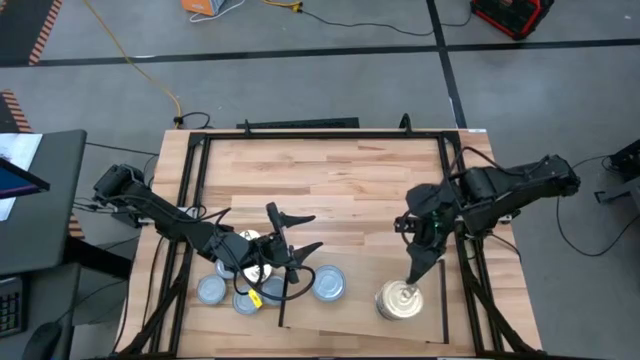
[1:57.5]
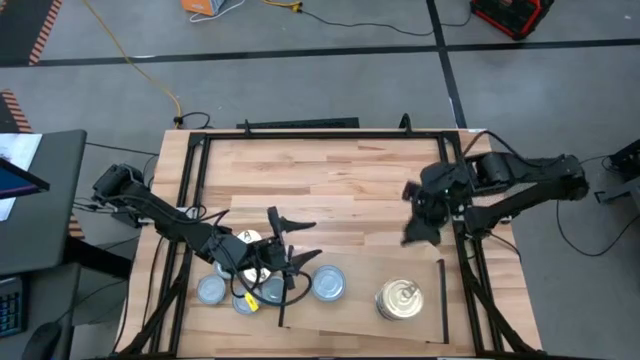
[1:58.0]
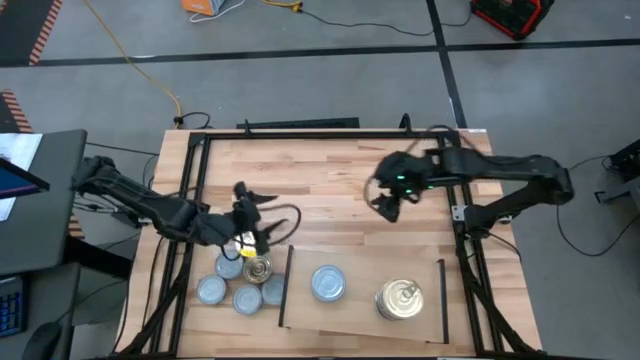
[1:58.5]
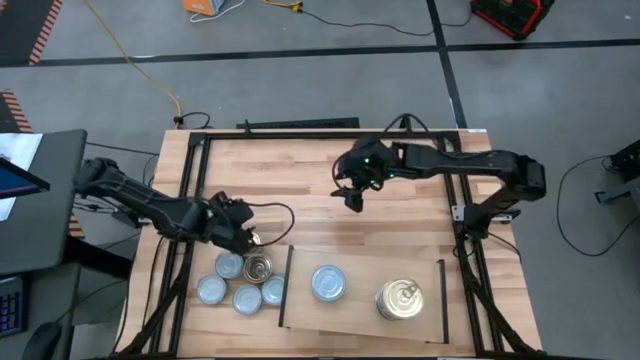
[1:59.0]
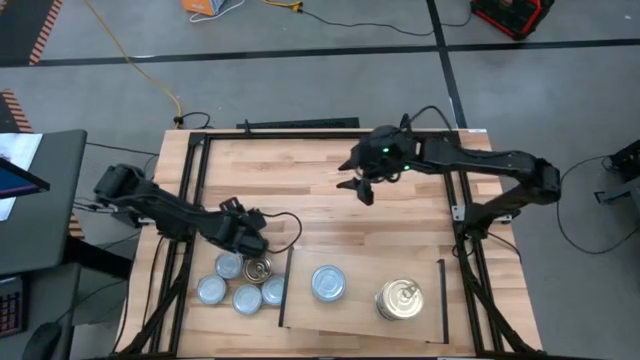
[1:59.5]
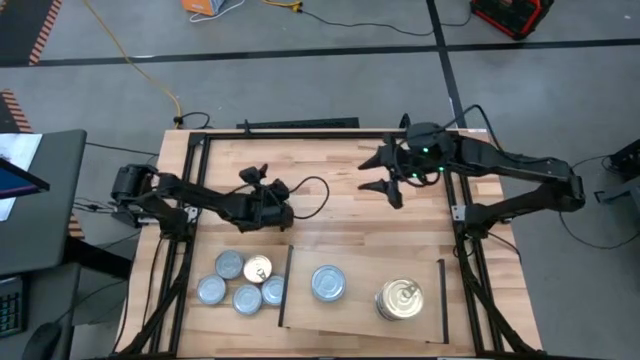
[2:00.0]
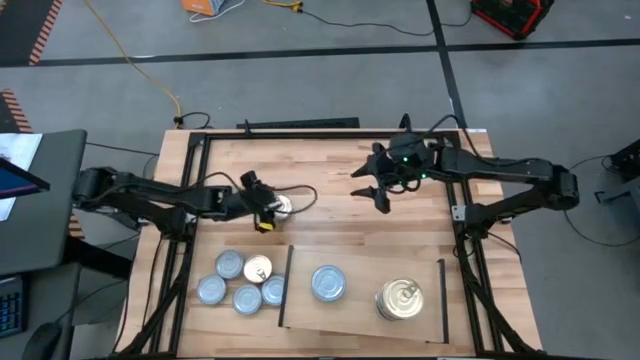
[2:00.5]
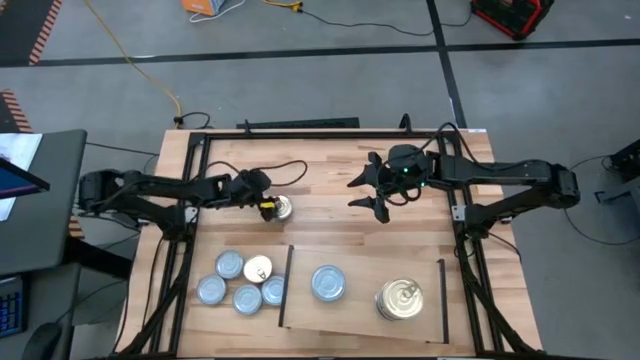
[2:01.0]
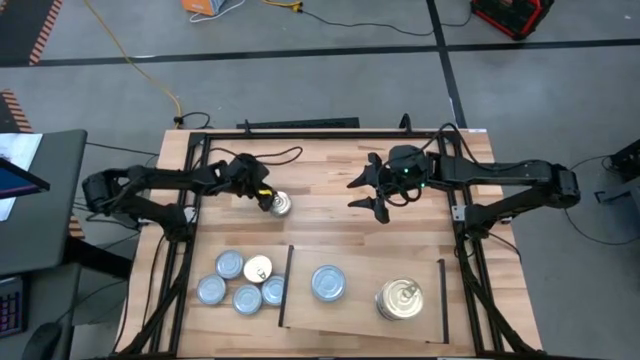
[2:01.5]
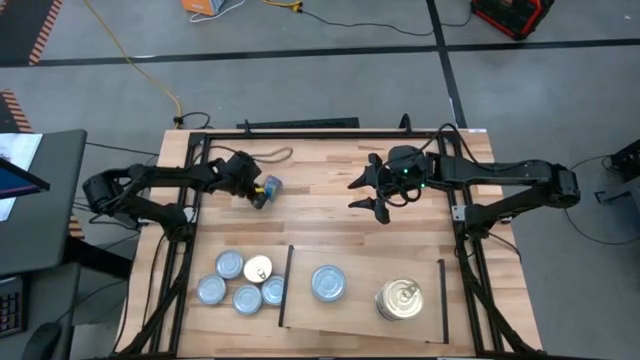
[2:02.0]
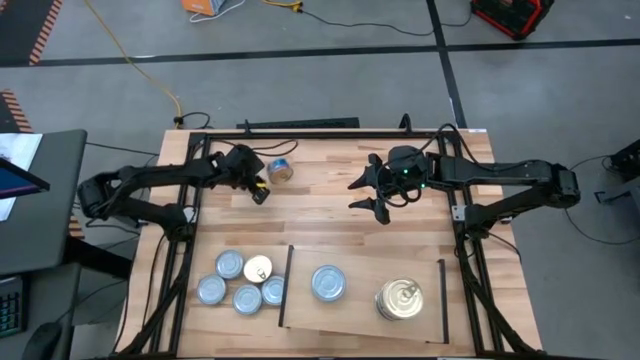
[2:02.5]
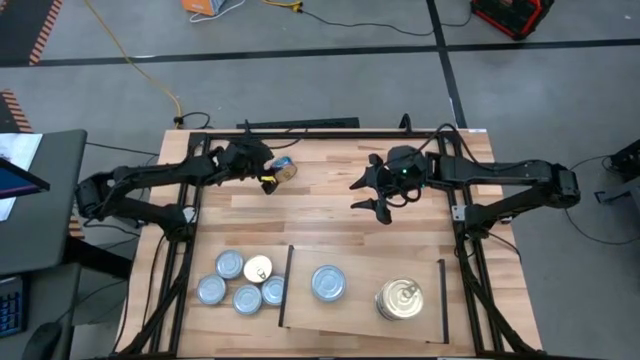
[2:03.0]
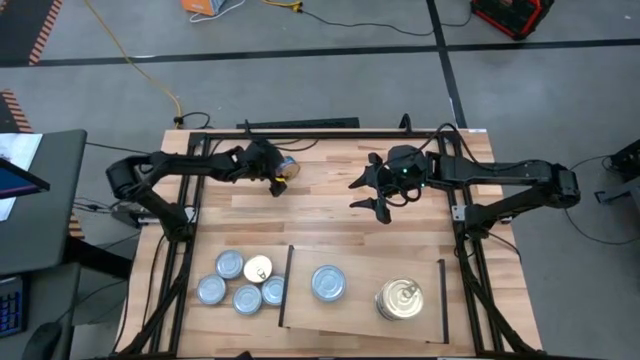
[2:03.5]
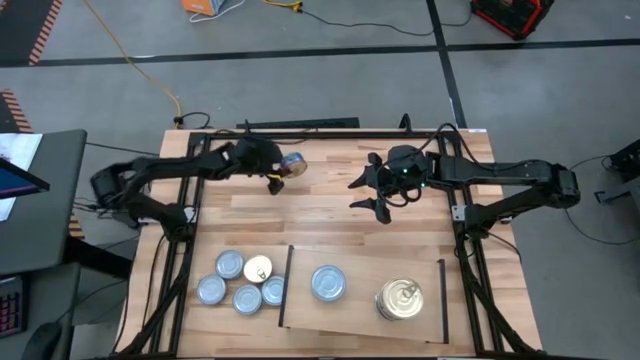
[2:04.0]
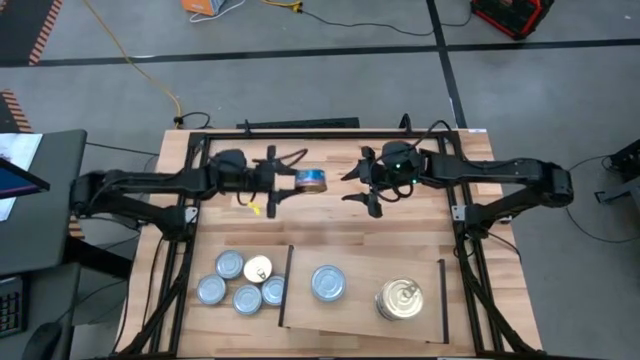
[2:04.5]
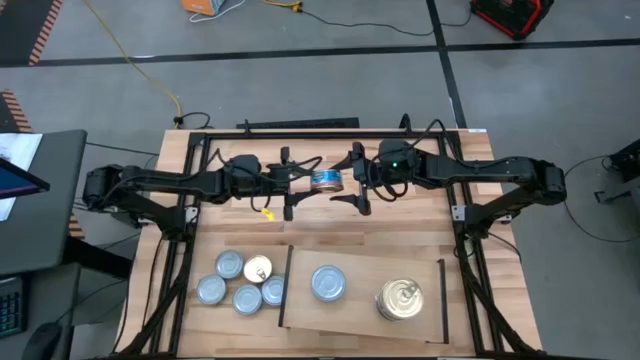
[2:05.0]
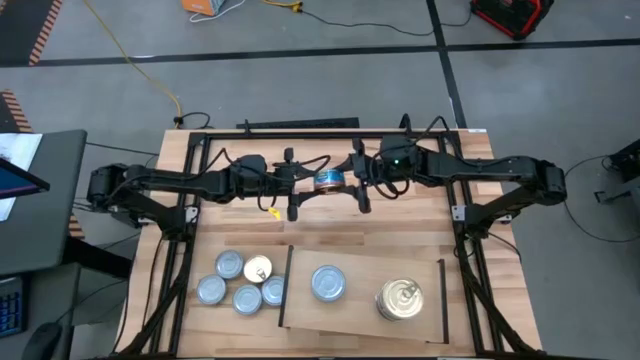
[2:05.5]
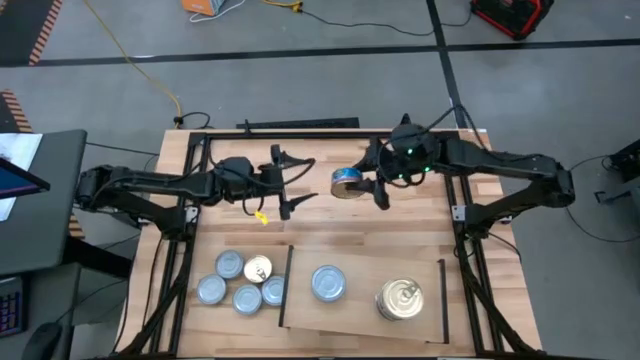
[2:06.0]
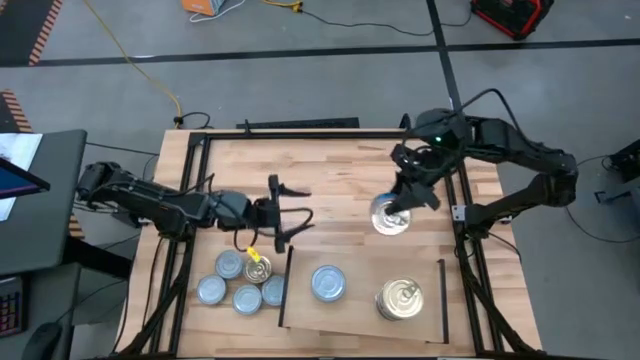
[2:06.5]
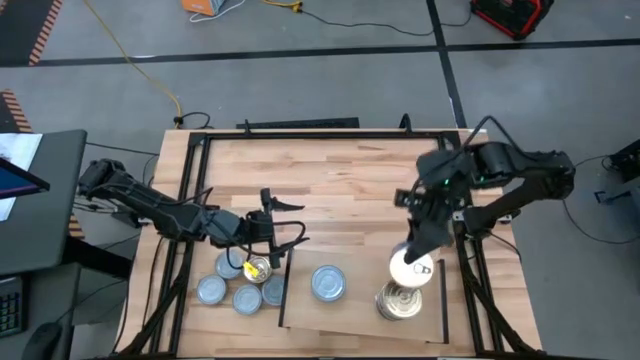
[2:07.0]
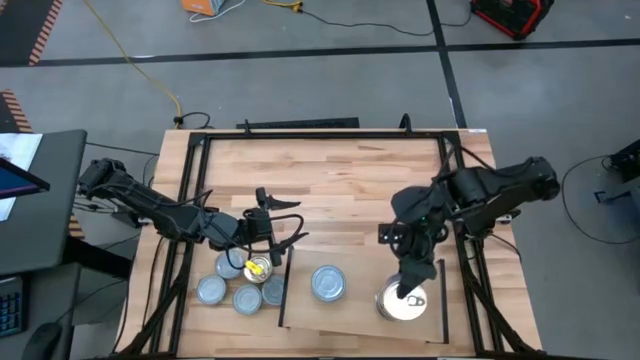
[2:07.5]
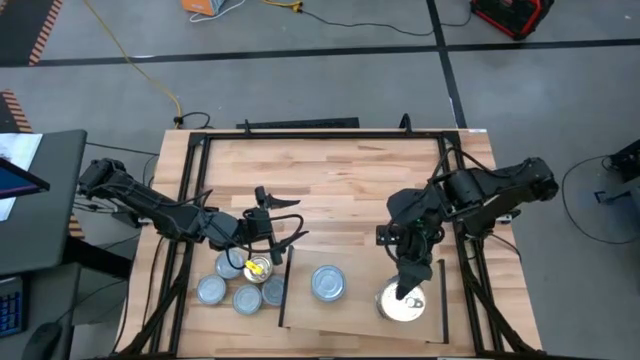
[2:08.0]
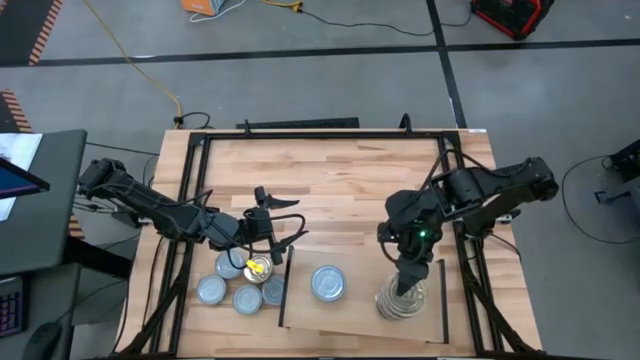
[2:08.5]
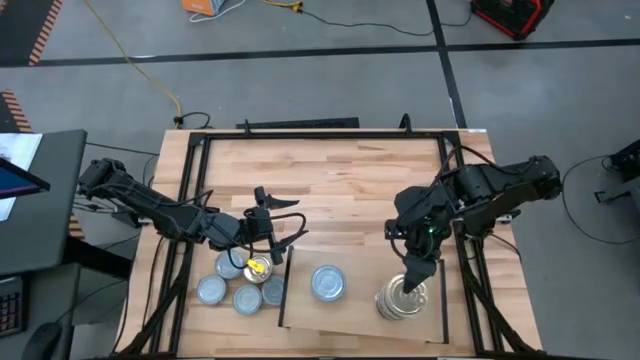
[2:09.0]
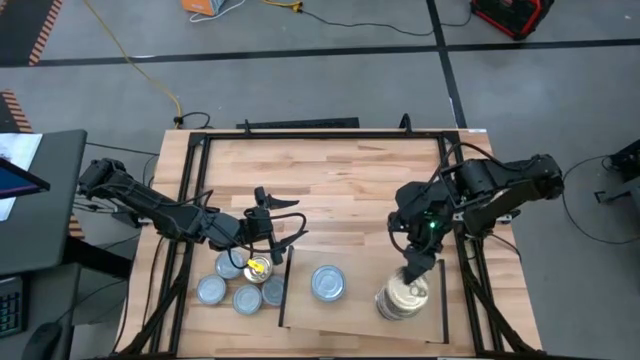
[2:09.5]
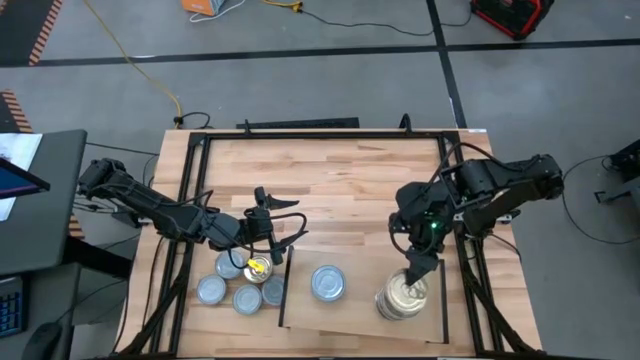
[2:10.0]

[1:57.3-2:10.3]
Task: Stack canned seafood by type on shelf
Stack the blue-pink tuna can on the top of the blue-pink tuna cans on the shelf

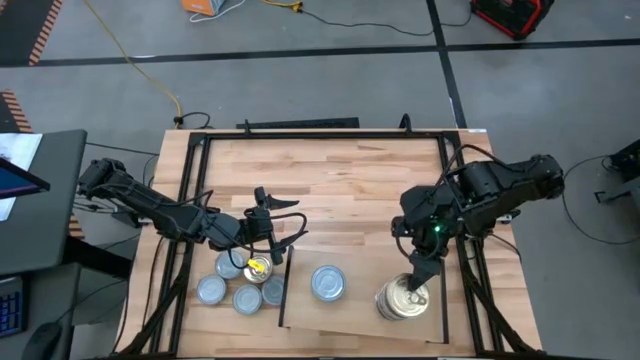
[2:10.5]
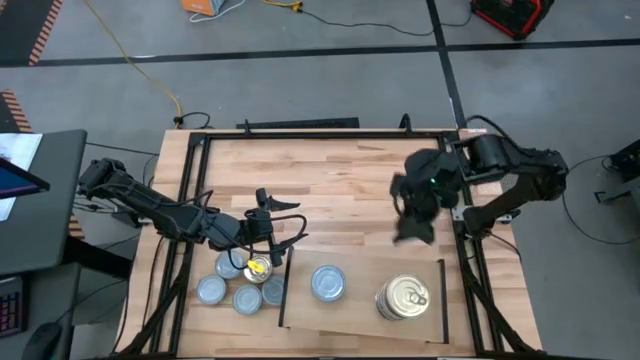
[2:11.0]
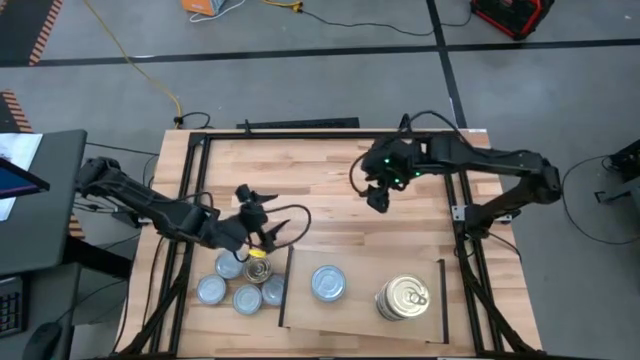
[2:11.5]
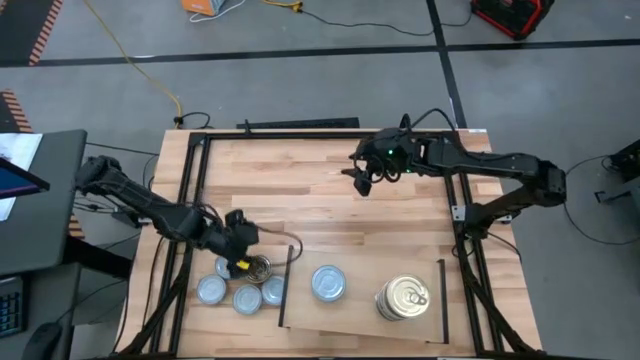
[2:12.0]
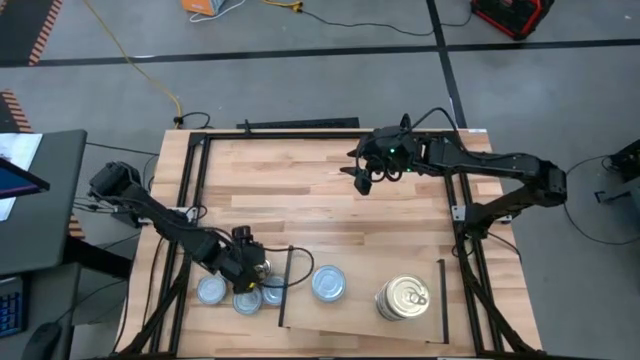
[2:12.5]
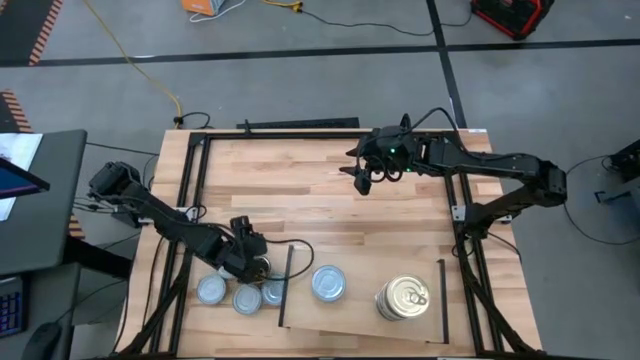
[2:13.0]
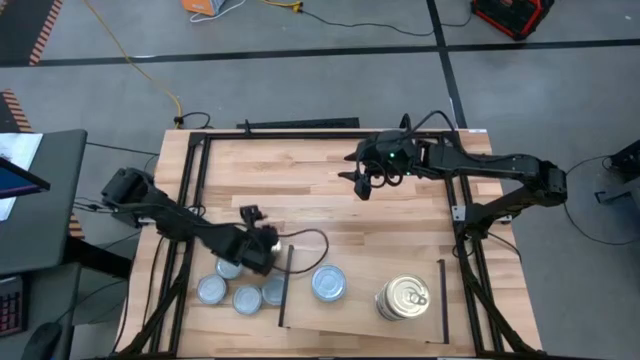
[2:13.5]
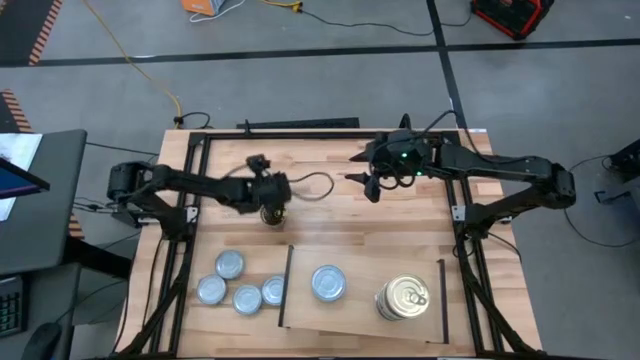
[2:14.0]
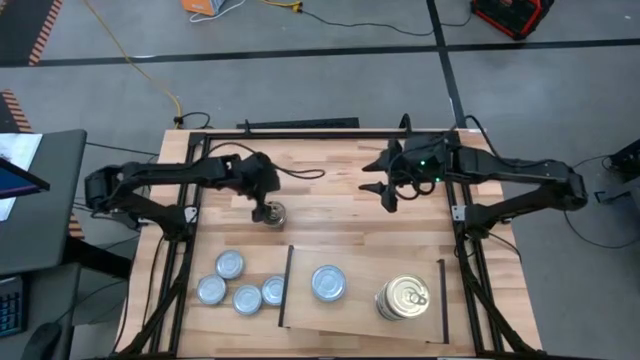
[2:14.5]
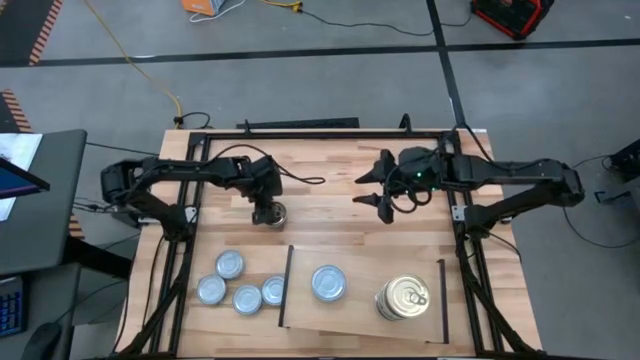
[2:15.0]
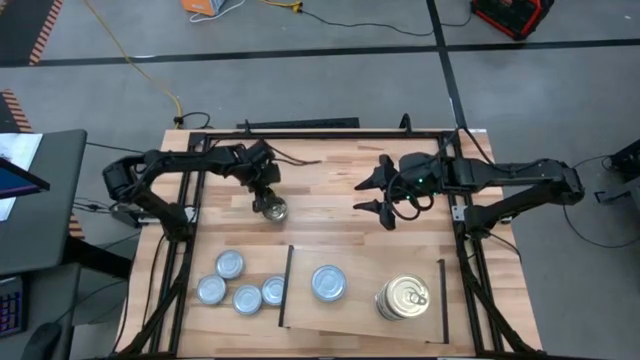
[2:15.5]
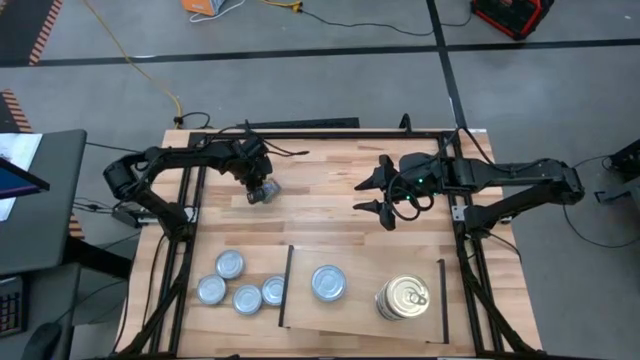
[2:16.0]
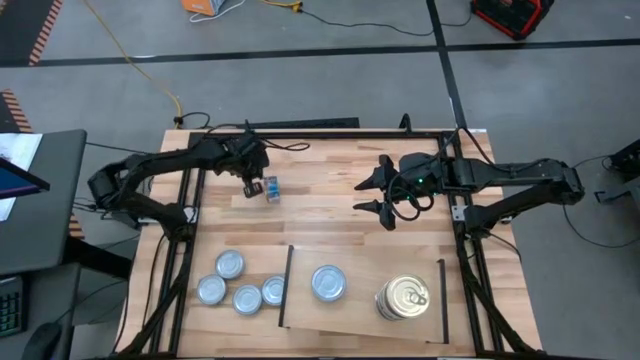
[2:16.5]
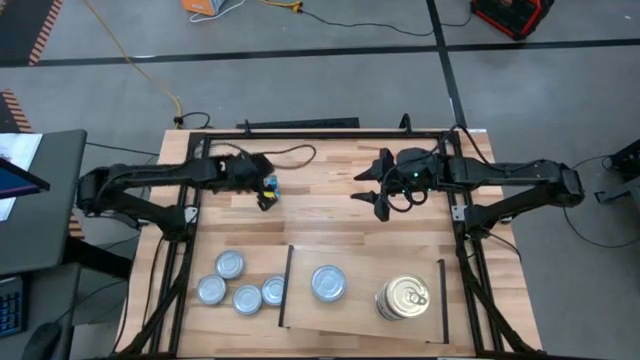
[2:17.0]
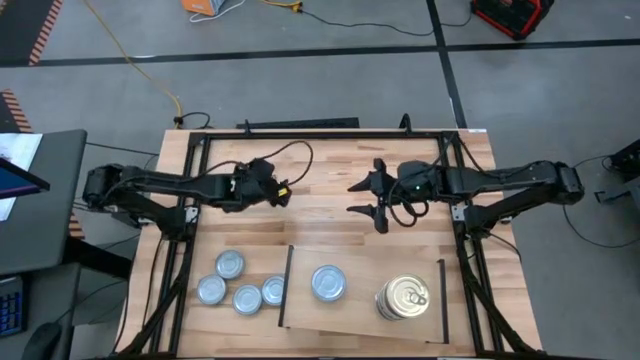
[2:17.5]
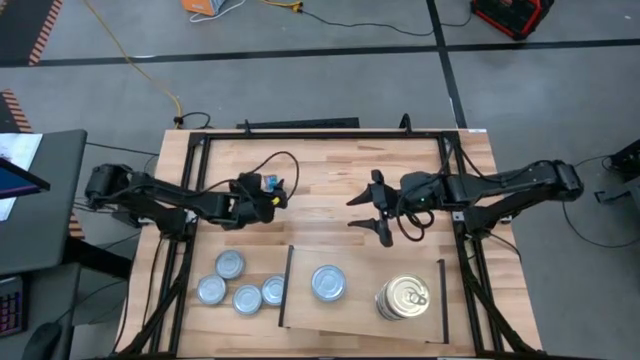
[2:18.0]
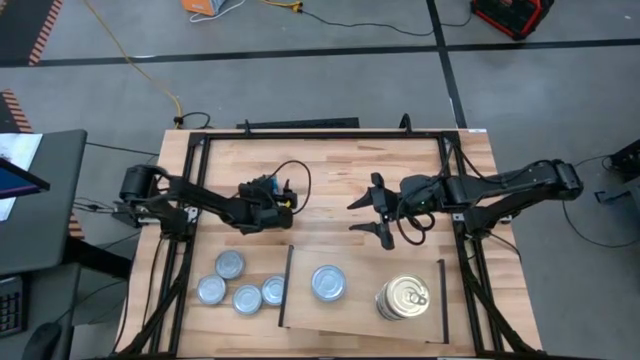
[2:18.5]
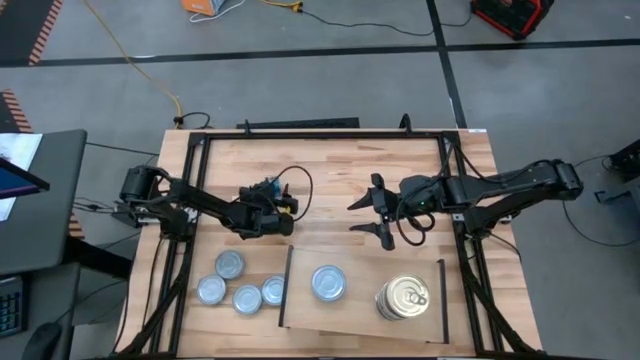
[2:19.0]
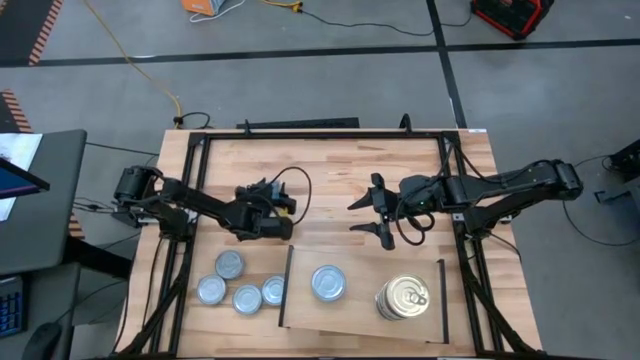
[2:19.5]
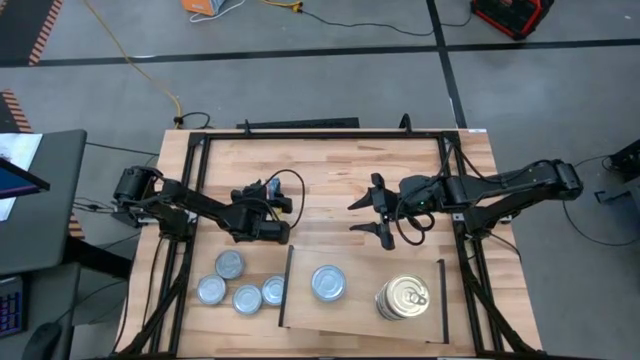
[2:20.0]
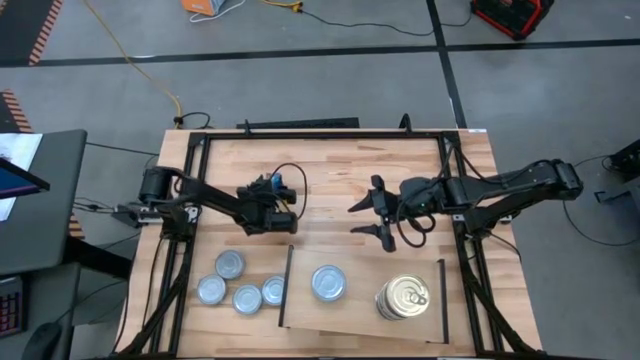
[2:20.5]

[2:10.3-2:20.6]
Stack the blue-pink tuna can on the top of the blue-pink tuna cans on the shelf
